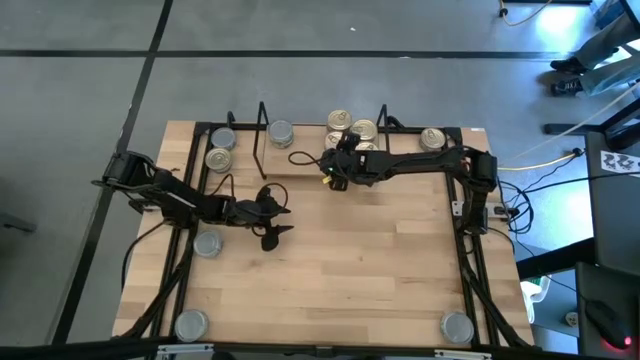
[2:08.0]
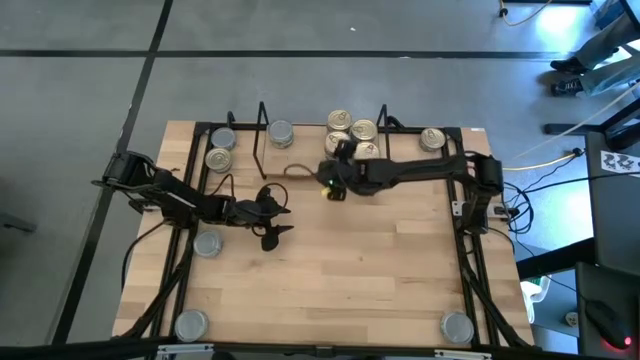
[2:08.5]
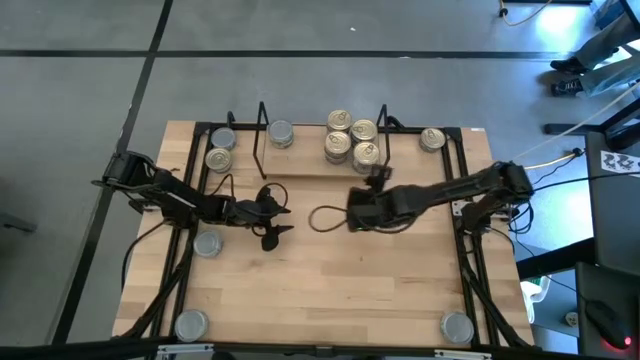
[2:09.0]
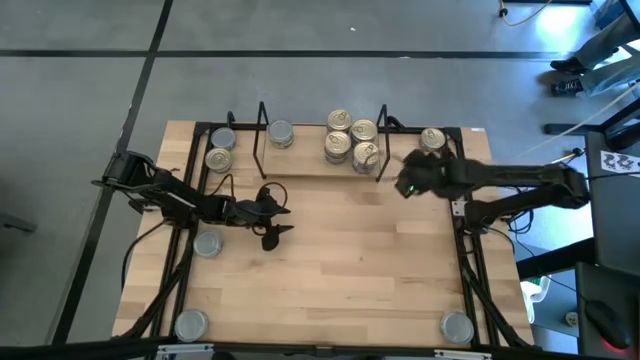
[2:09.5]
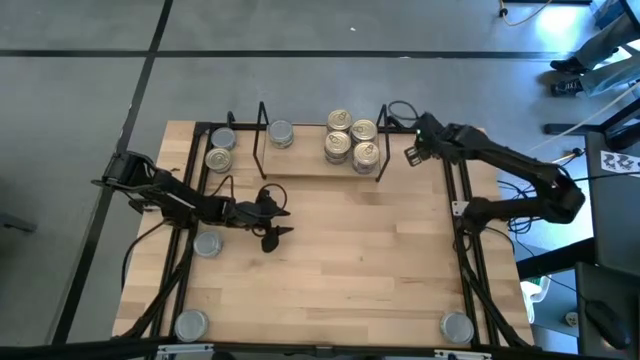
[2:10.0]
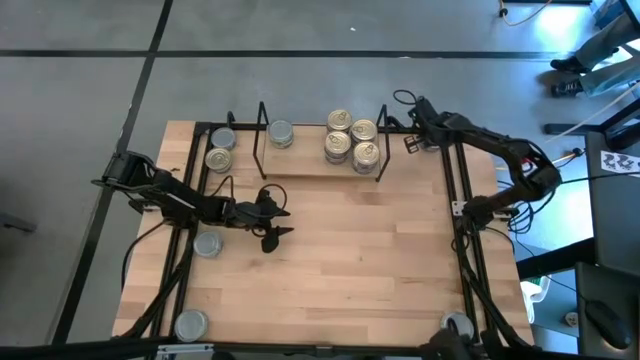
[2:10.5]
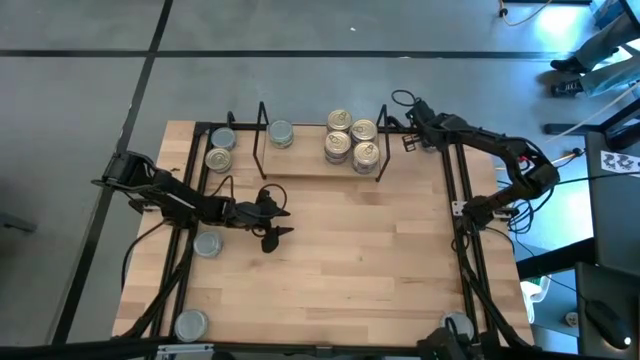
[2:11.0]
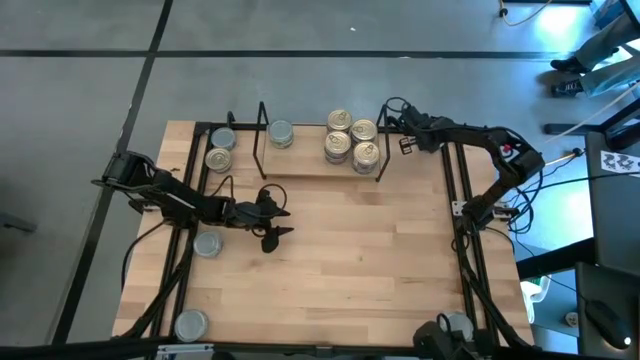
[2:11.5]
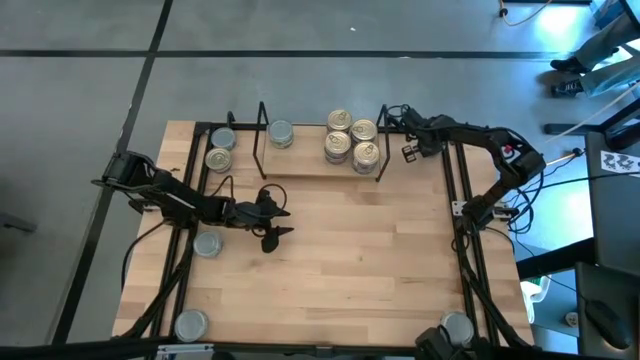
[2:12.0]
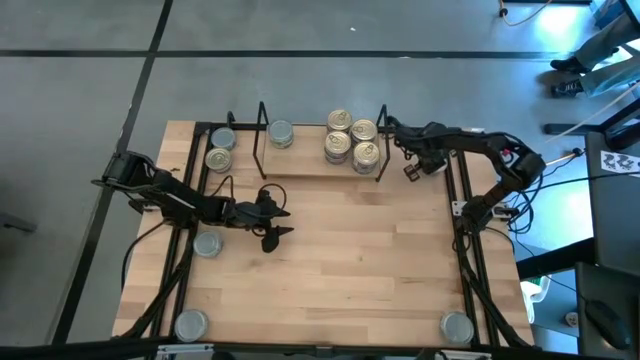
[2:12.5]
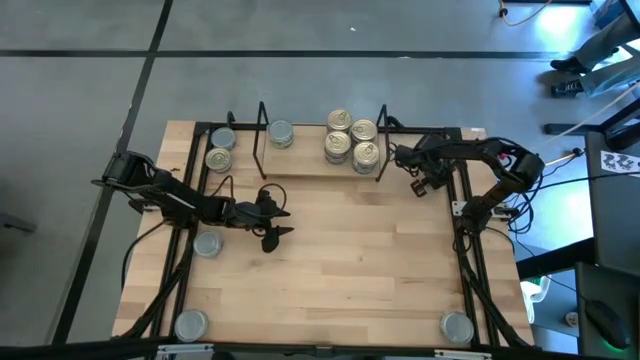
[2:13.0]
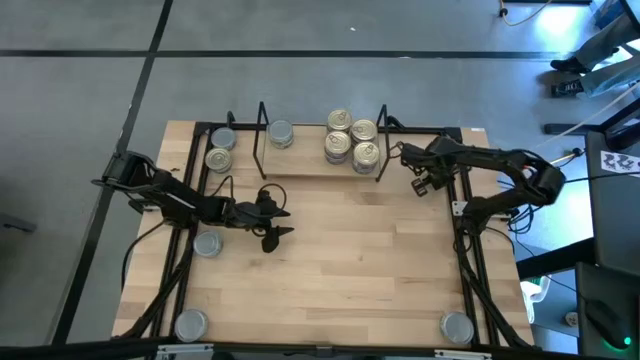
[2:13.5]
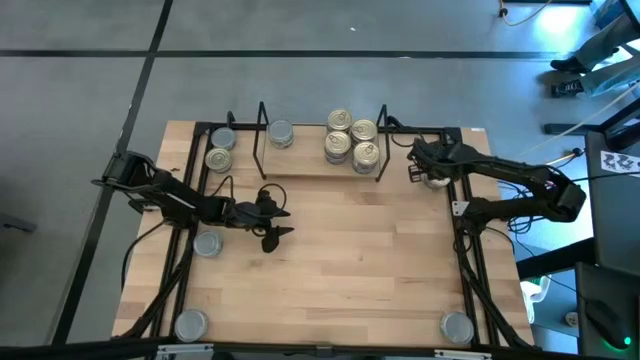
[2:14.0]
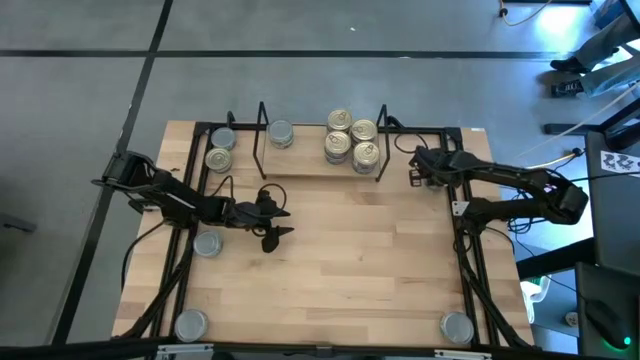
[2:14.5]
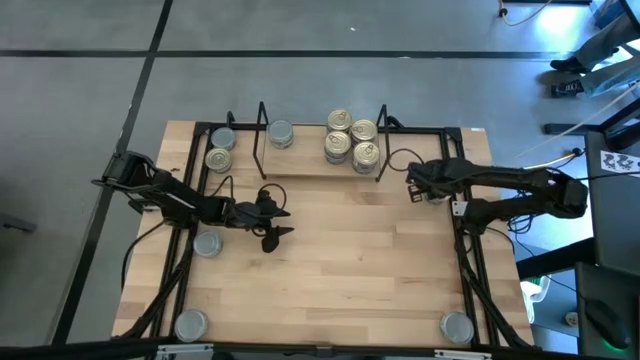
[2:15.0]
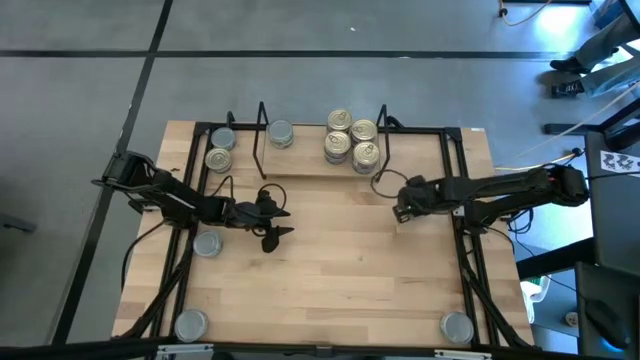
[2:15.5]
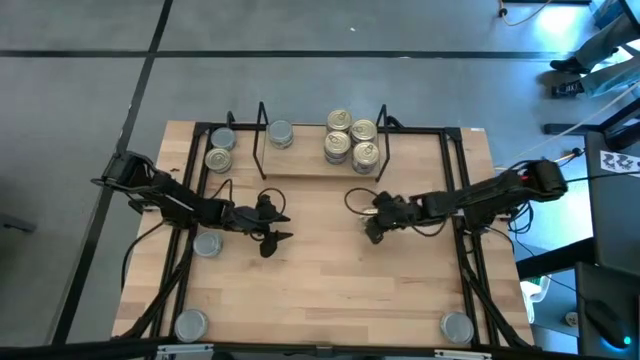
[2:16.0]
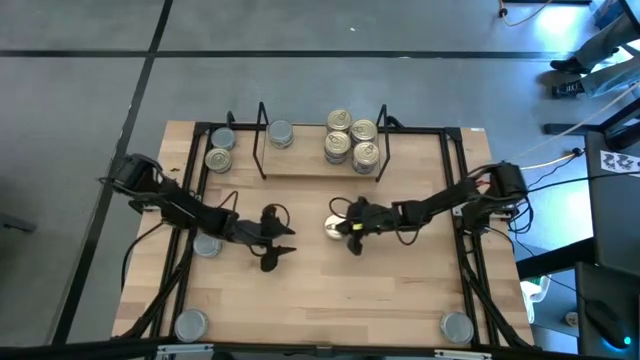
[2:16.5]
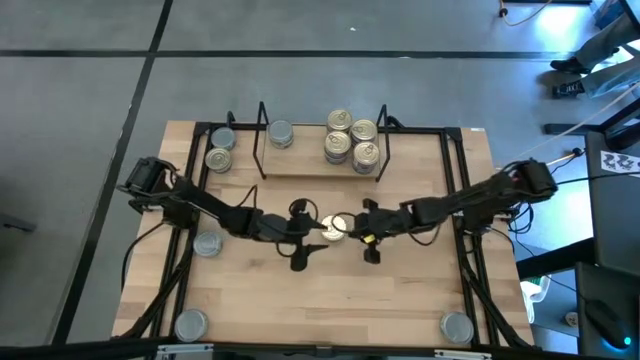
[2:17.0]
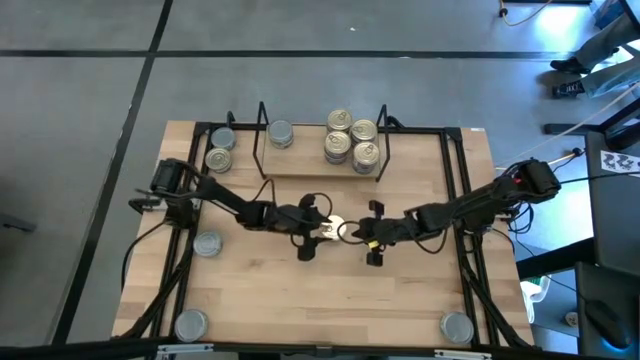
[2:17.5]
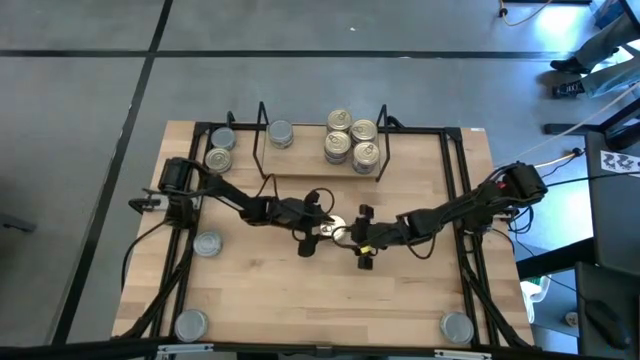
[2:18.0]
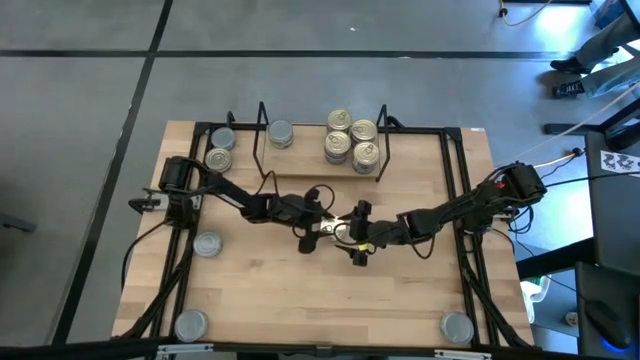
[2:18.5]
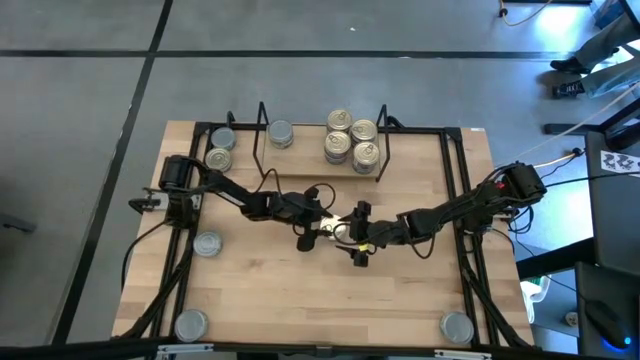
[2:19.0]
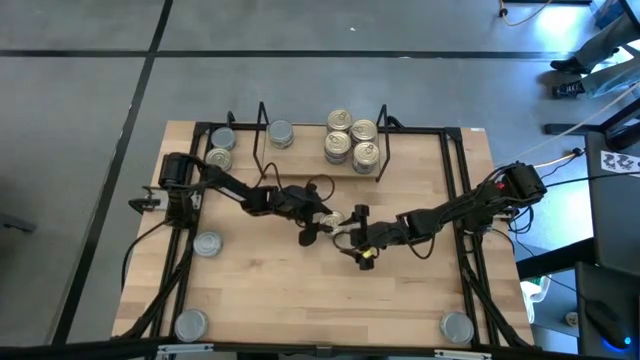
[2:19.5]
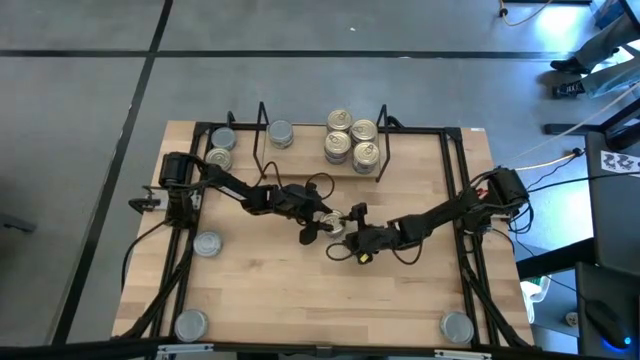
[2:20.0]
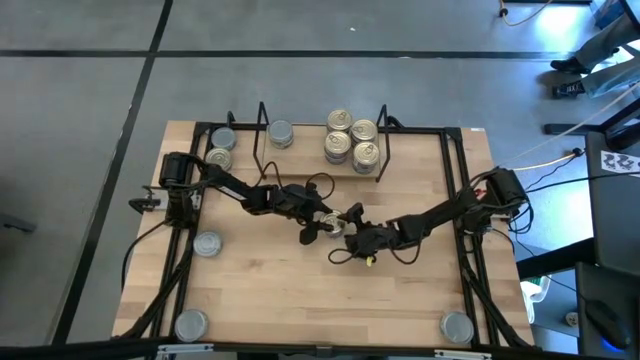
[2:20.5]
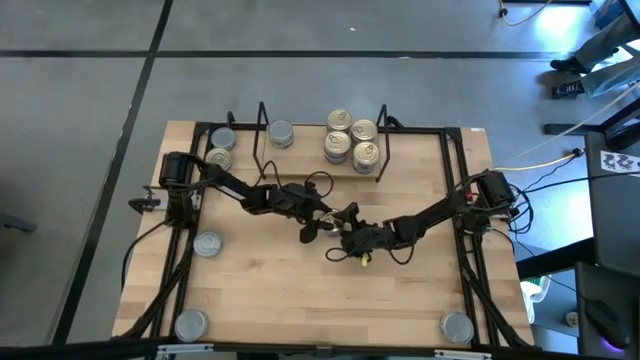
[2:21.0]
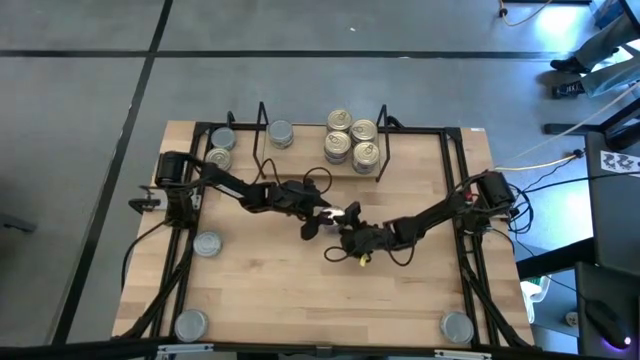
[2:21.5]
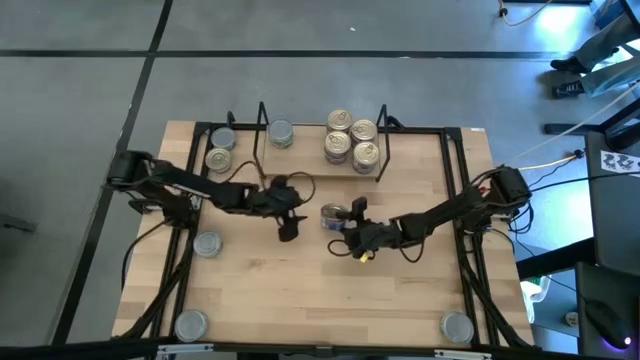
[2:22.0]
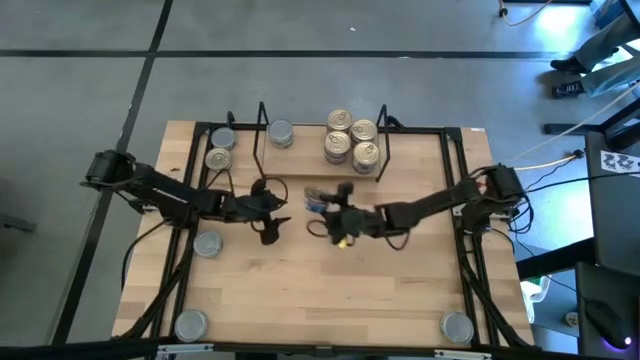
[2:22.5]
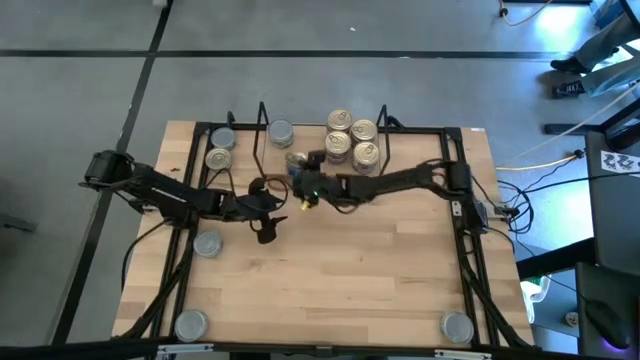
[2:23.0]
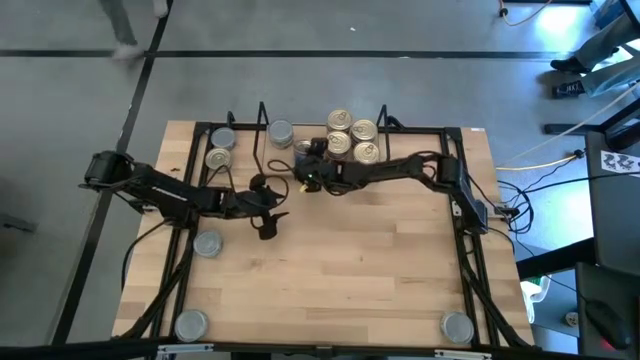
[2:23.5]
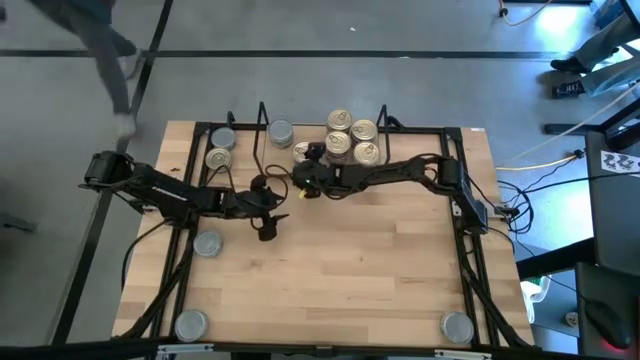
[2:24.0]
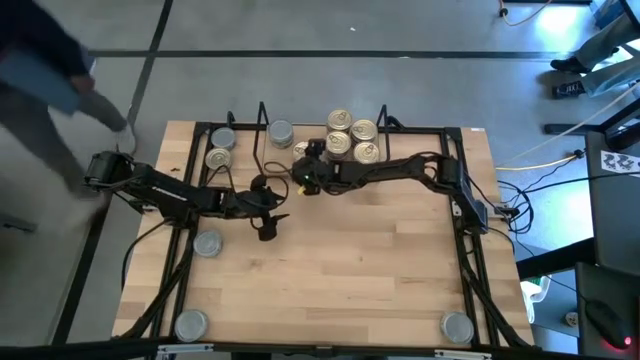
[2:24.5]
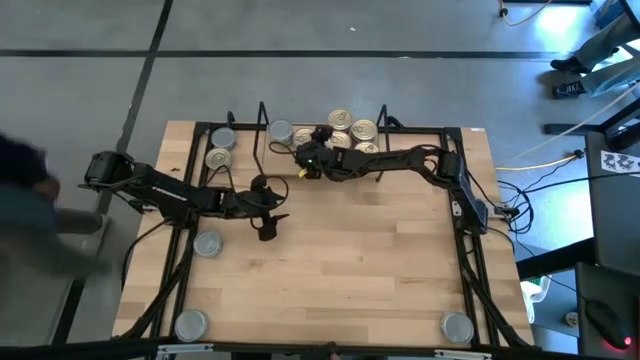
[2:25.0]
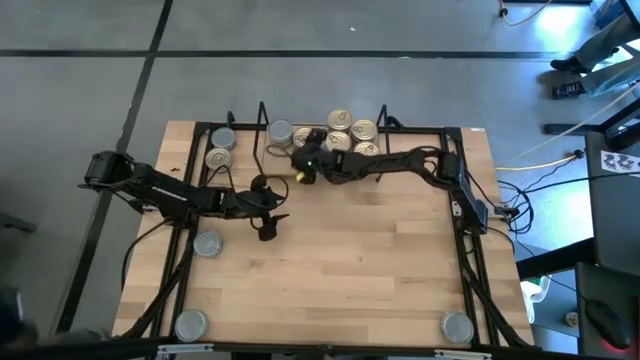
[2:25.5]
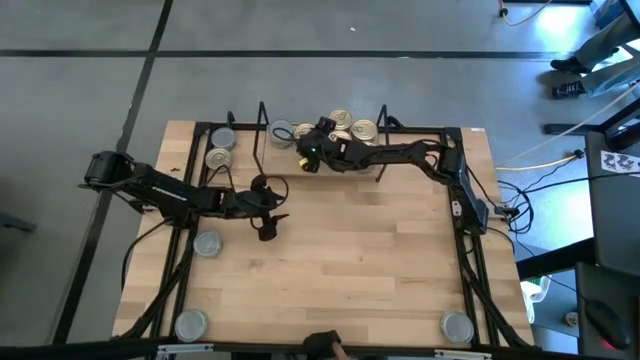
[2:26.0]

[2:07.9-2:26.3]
Task: Stack canned seafood by type on shelf
Put the blue-pink tuna can on the shelf

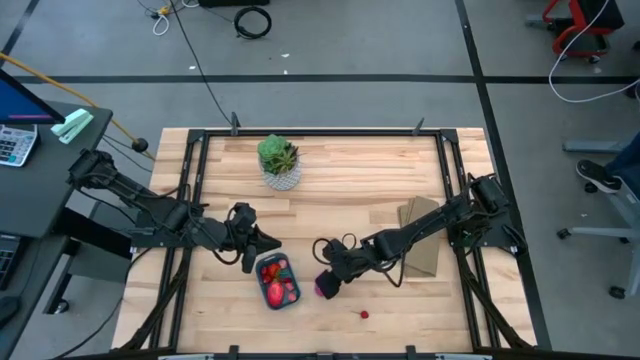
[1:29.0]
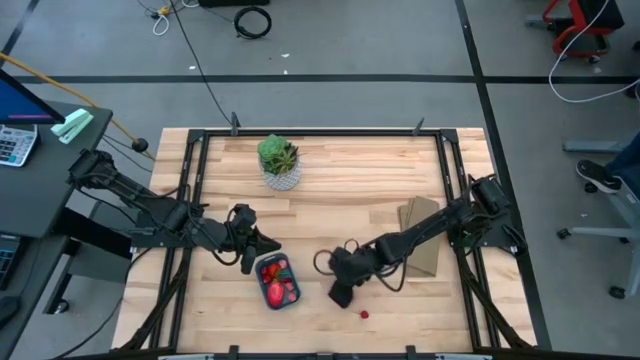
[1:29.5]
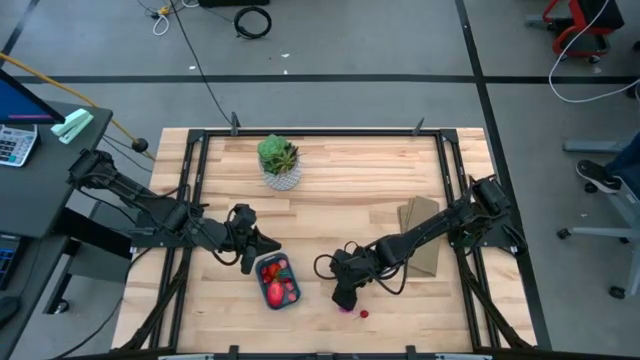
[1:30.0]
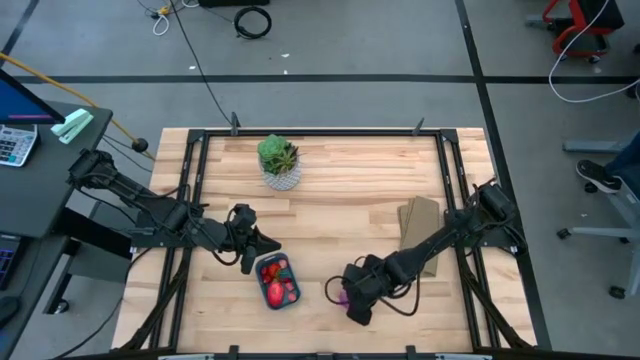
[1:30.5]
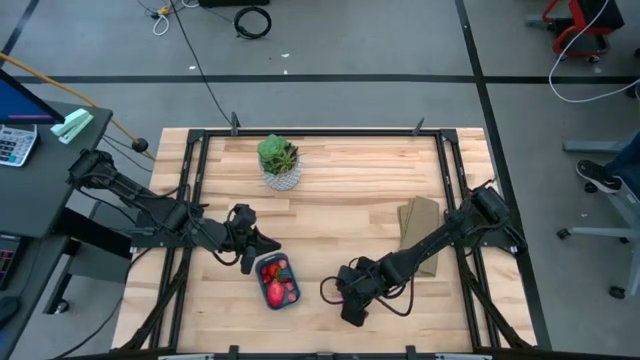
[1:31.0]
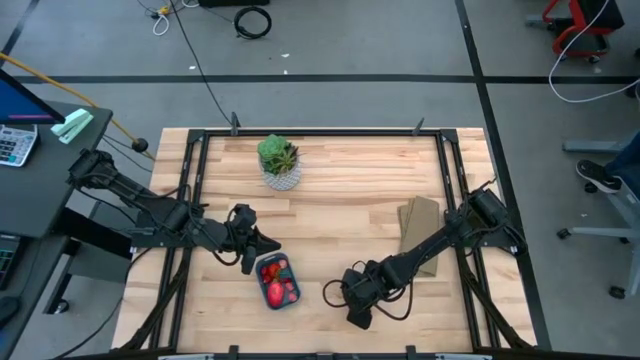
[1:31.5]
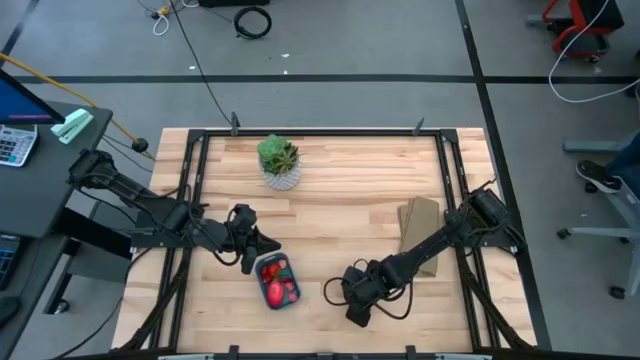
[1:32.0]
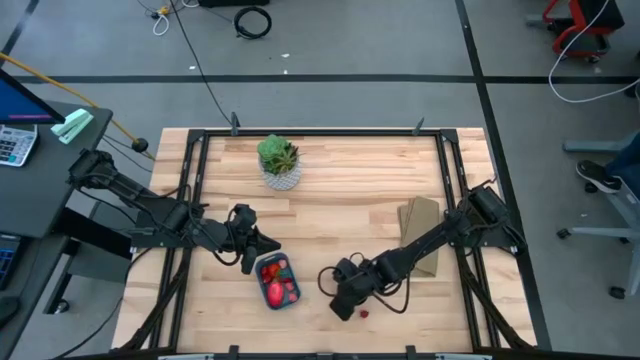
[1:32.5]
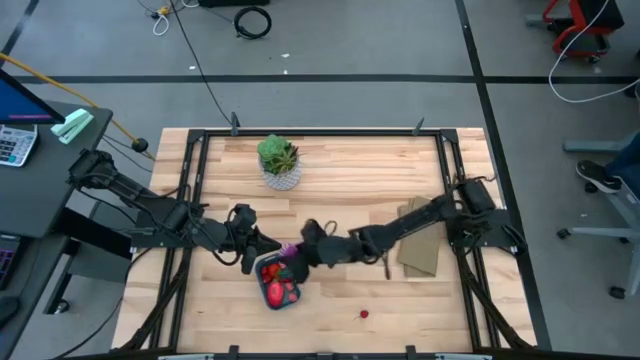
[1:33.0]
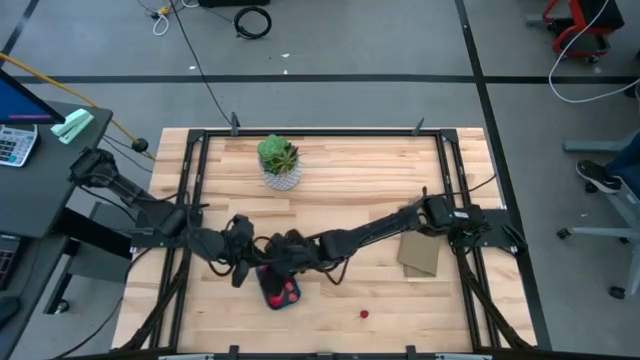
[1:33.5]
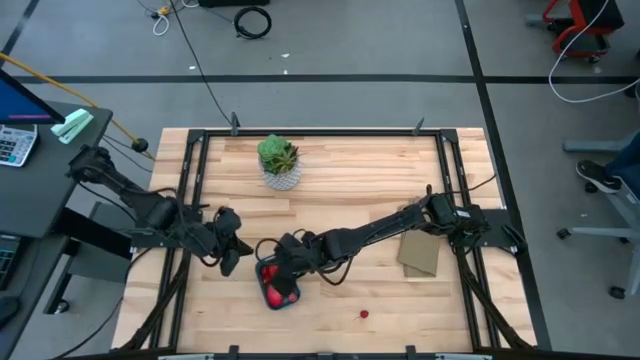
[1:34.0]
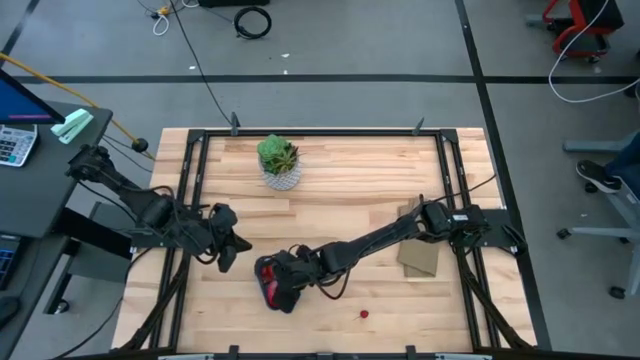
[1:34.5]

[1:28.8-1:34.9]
Task: Pick and placing Produce into tupperware
Put the purple onion into the bin
